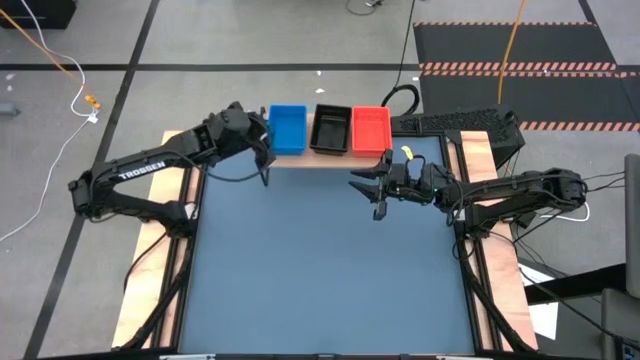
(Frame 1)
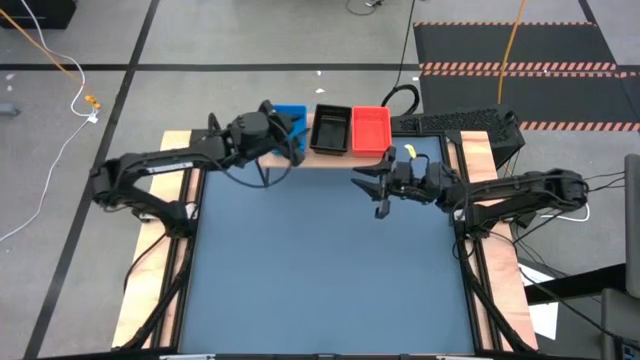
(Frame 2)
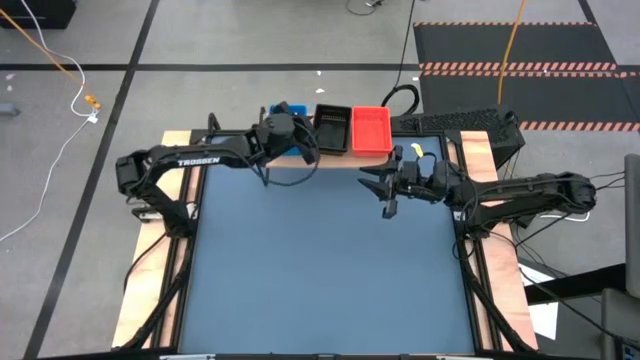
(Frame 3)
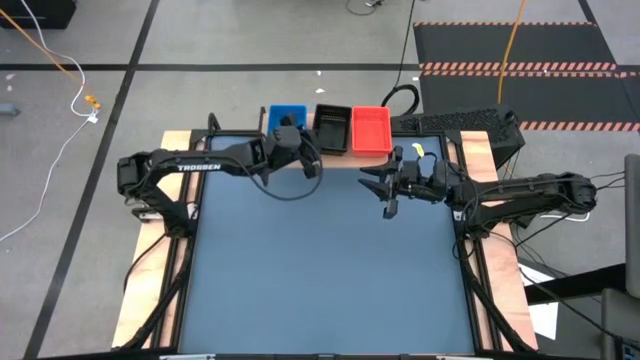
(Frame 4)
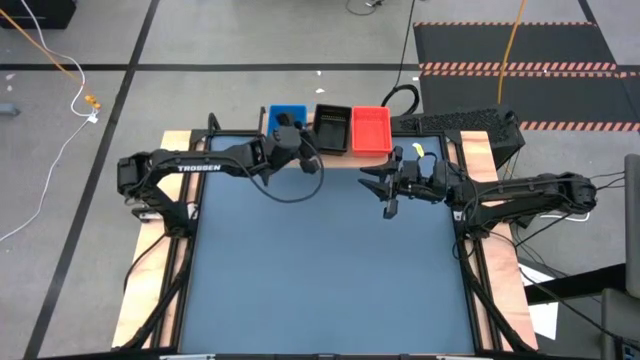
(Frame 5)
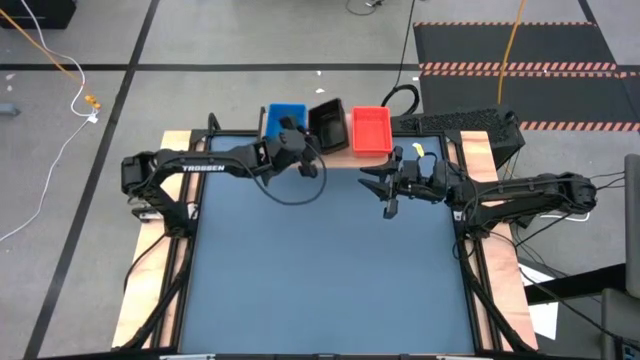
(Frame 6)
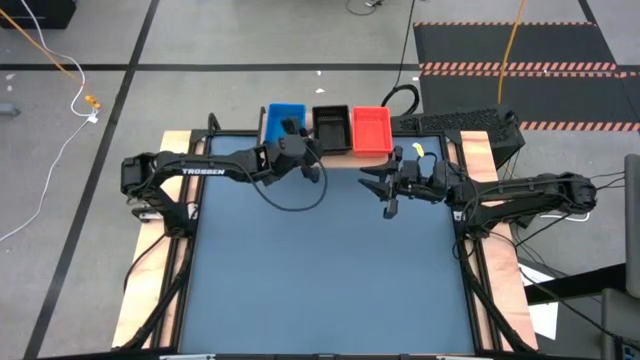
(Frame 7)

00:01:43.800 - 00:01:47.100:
Task: Stack baskets on shelf by color
Adjust the stacked black bins on the shelf

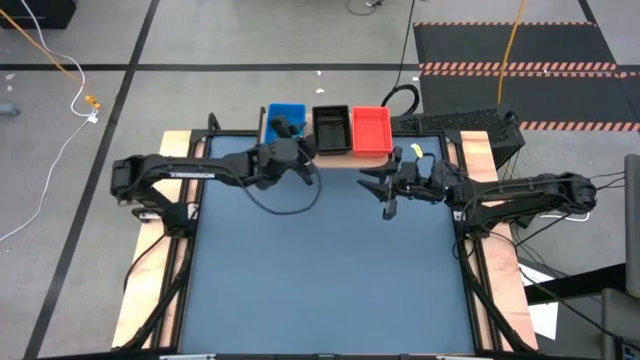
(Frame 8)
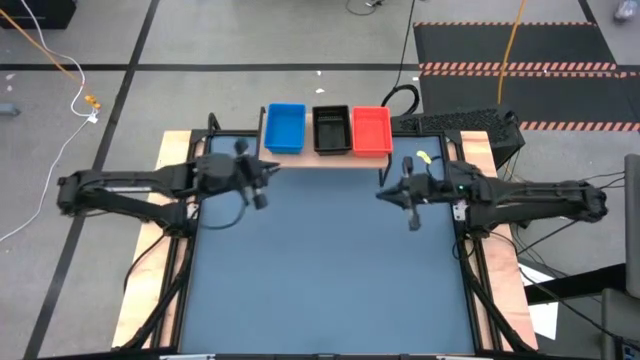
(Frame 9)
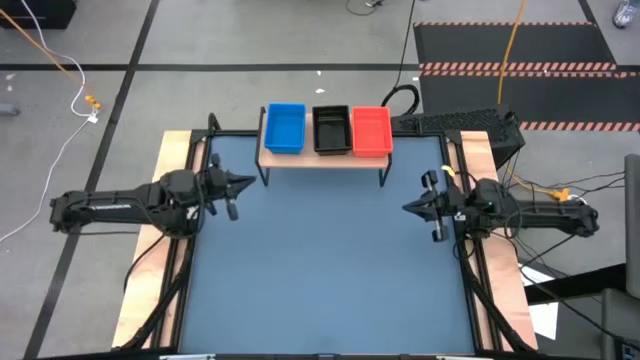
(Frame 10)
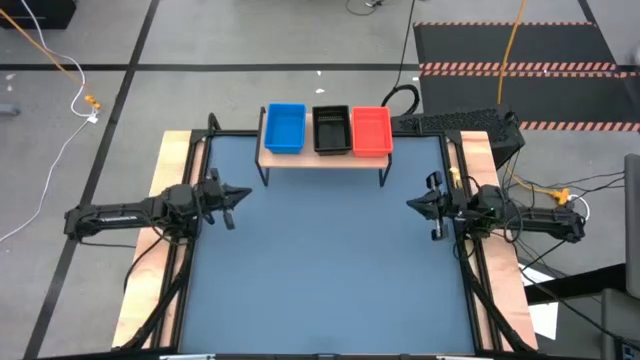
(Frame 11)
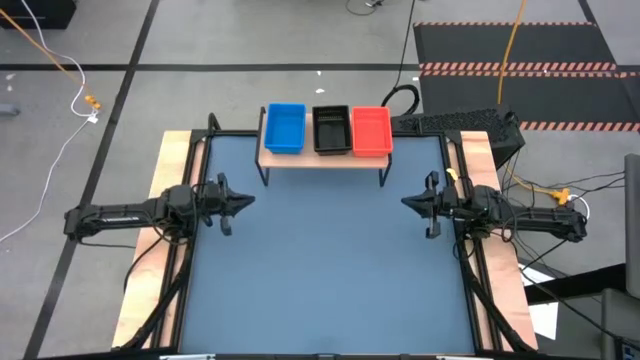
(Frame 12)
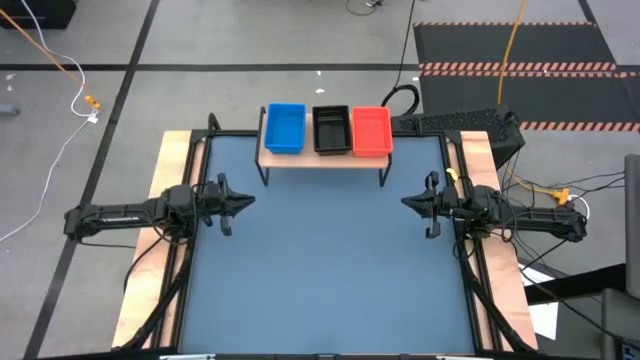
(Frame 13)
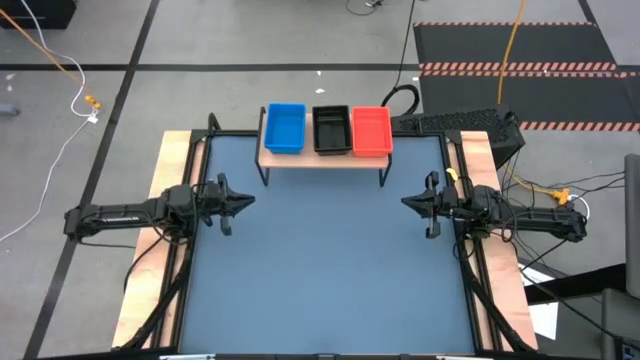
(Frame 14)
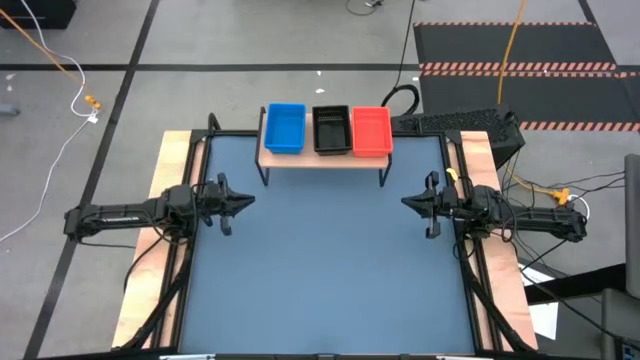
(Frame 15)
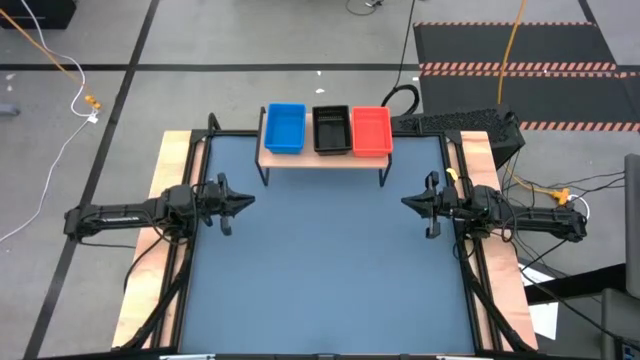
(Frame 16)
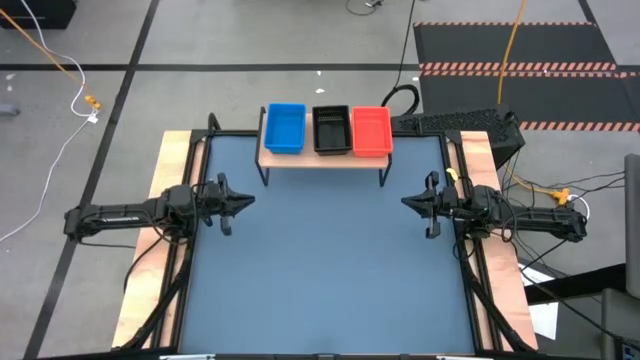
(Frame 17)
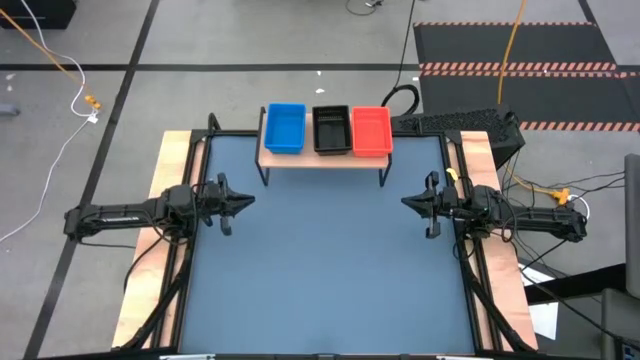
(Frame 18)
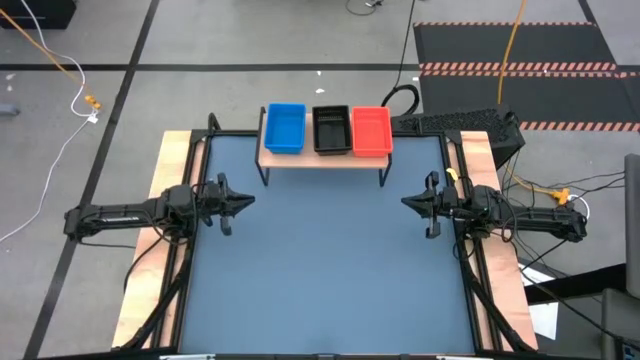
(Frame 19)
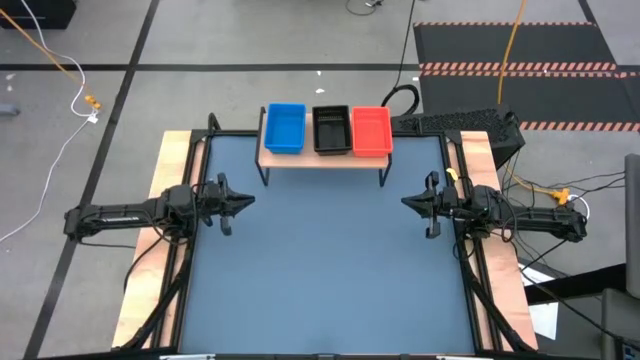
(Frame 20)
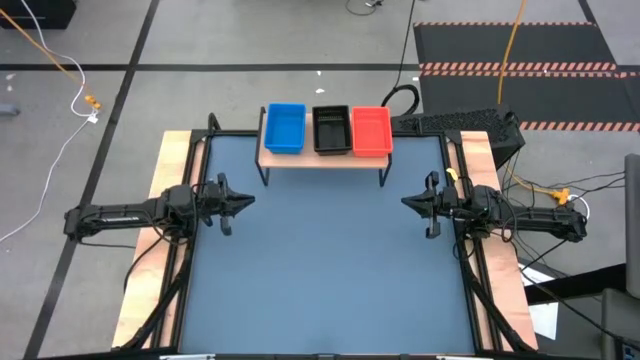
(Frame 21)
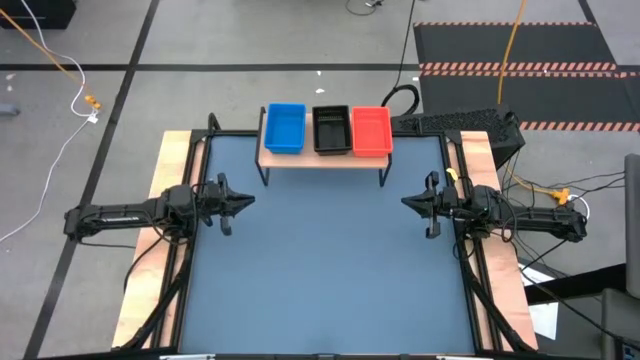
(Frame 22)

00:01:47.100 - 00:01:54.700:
Return to Home Position

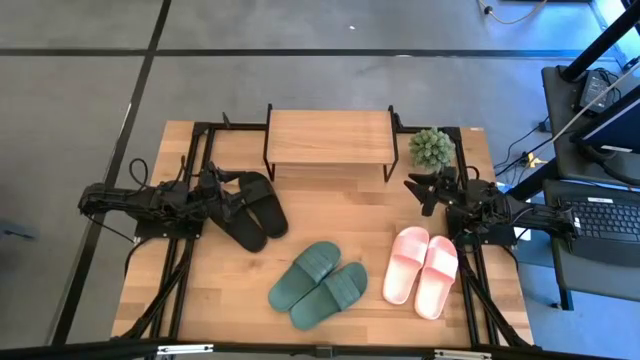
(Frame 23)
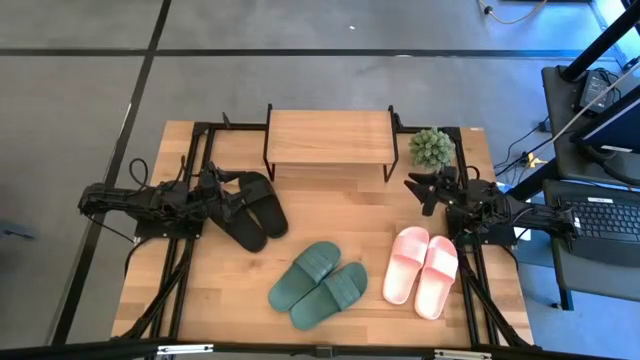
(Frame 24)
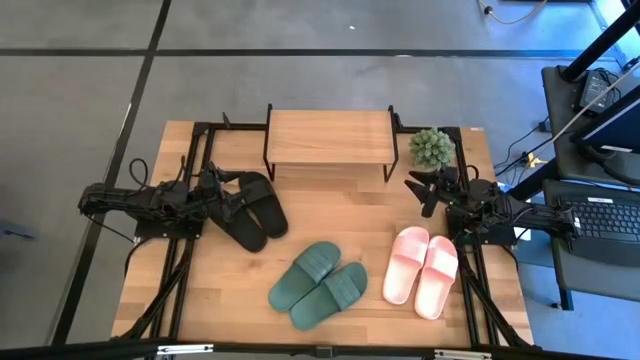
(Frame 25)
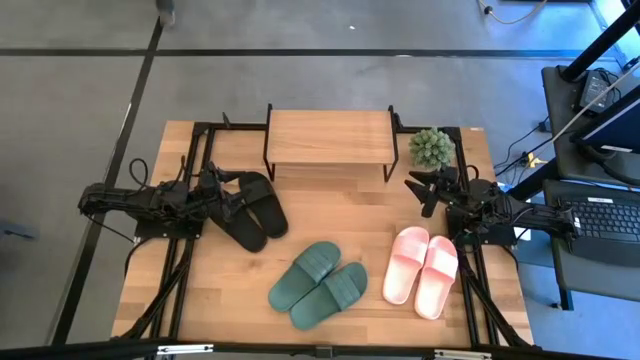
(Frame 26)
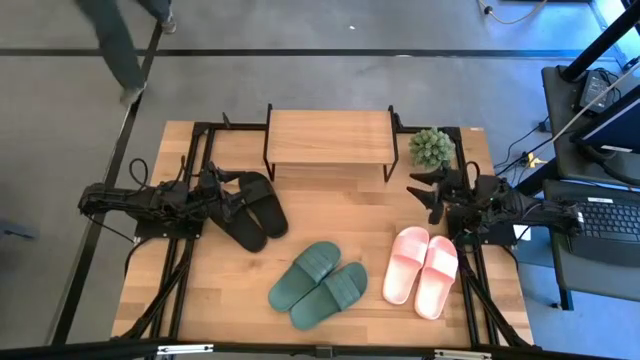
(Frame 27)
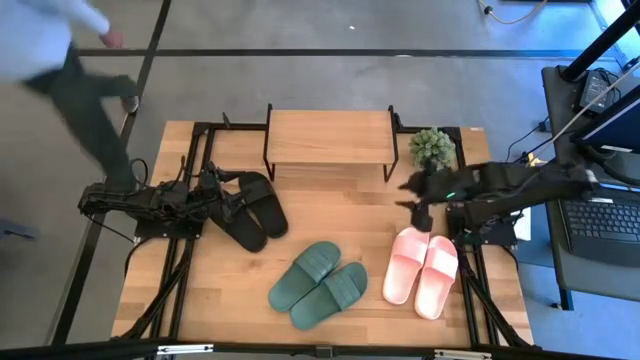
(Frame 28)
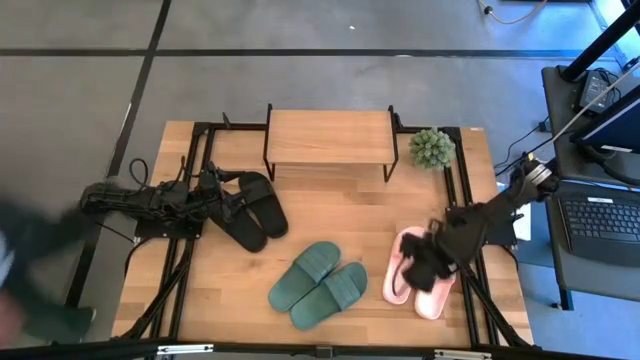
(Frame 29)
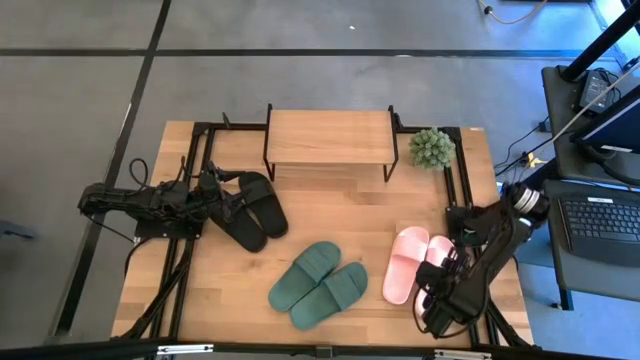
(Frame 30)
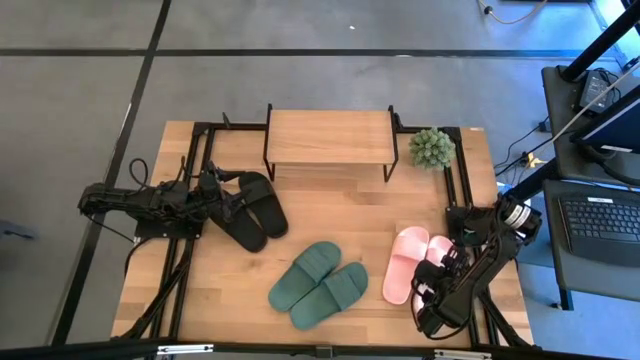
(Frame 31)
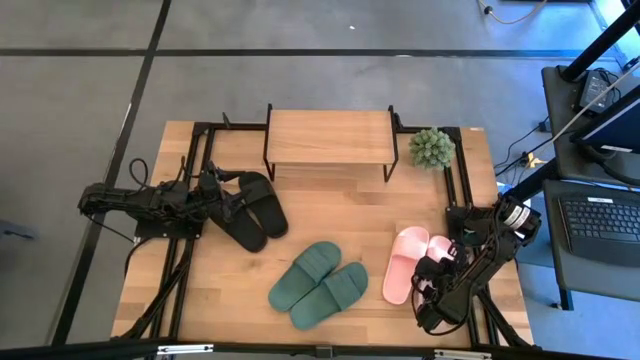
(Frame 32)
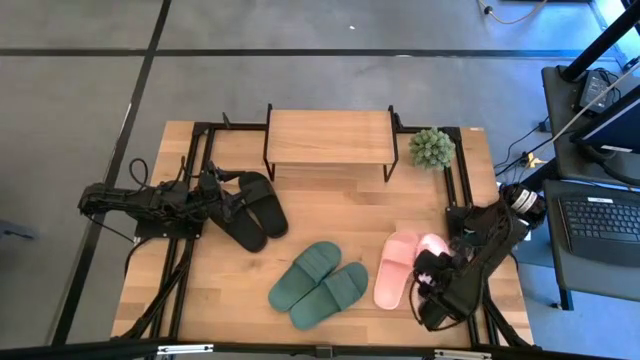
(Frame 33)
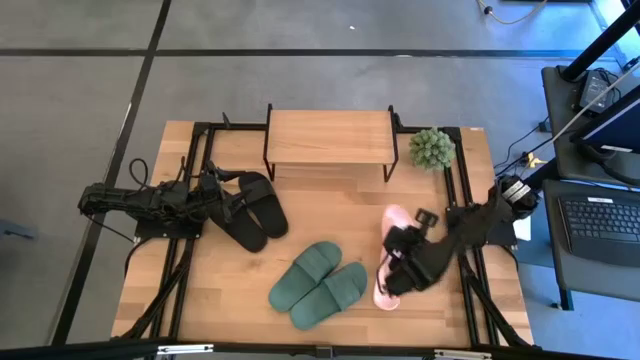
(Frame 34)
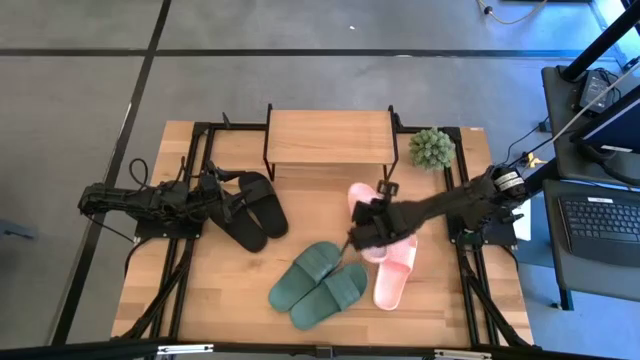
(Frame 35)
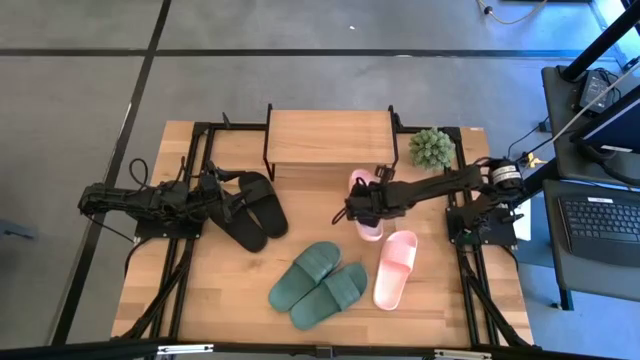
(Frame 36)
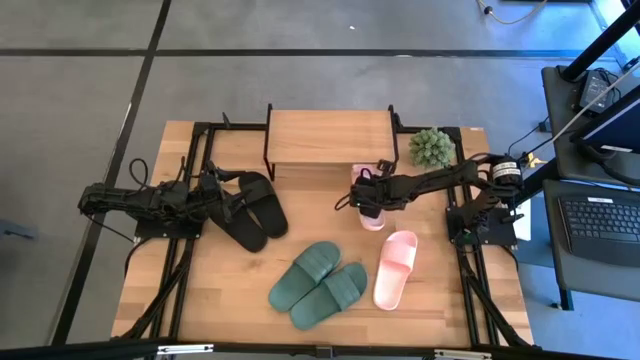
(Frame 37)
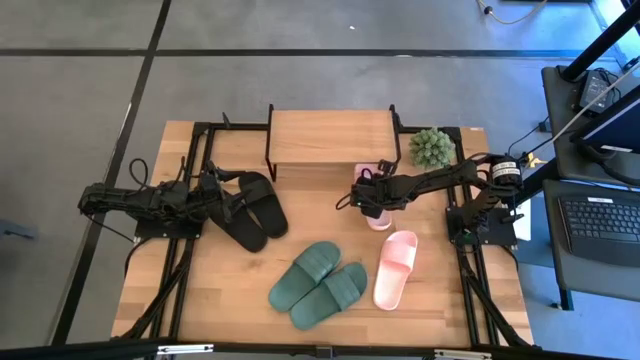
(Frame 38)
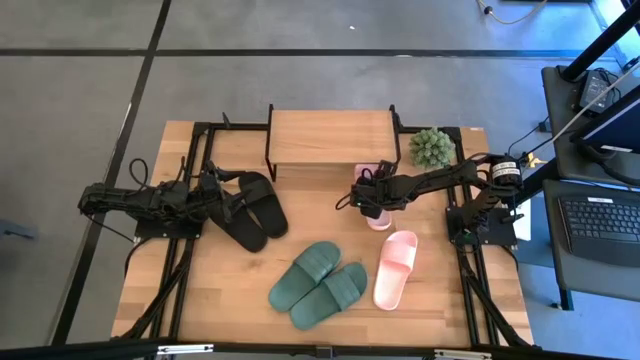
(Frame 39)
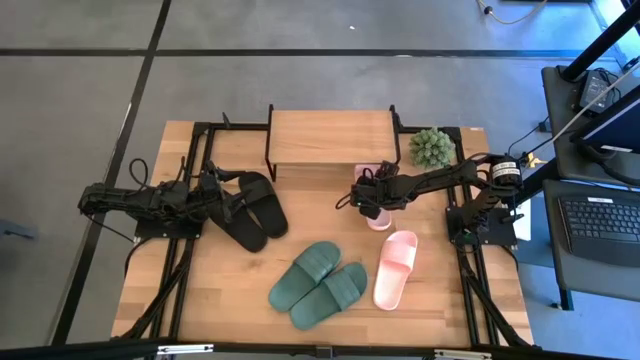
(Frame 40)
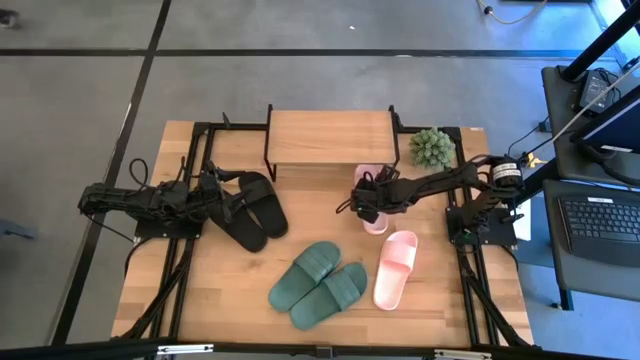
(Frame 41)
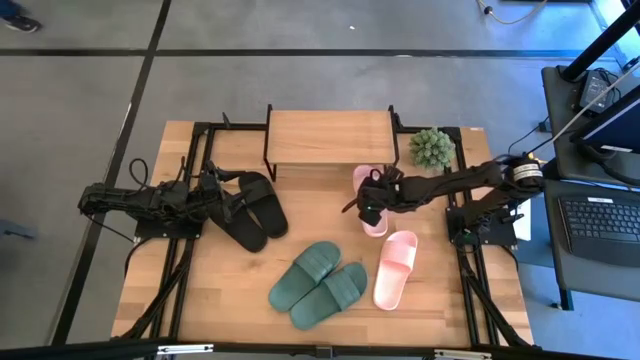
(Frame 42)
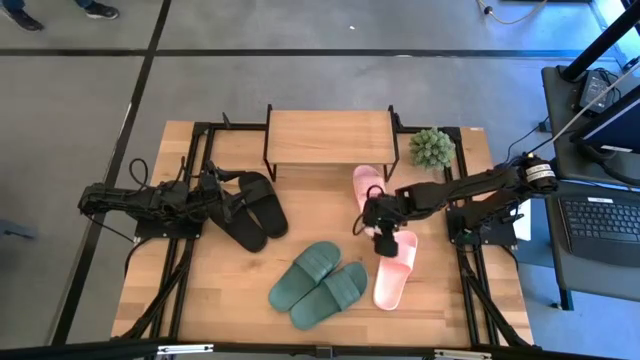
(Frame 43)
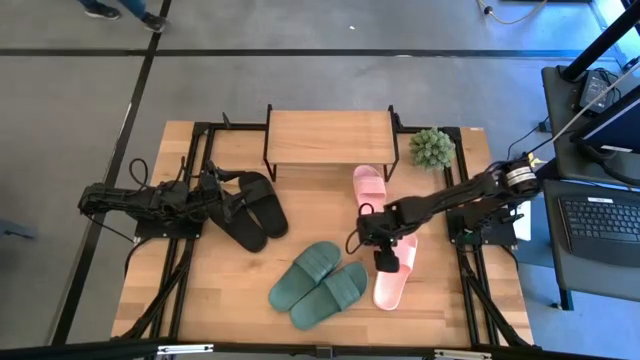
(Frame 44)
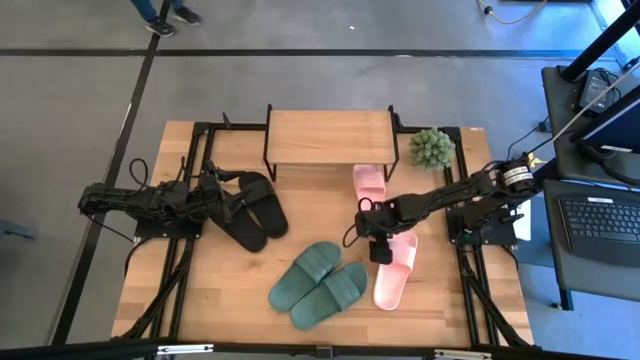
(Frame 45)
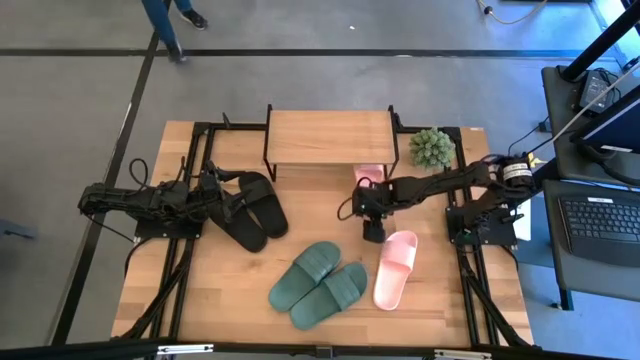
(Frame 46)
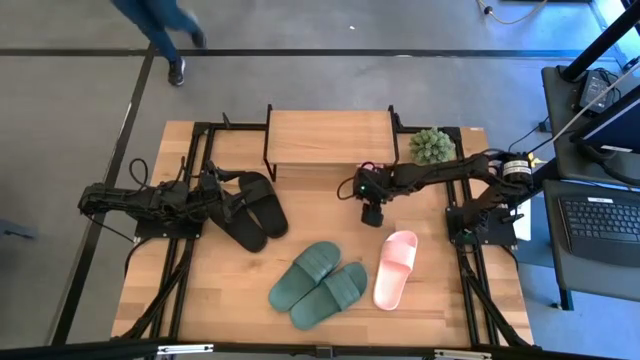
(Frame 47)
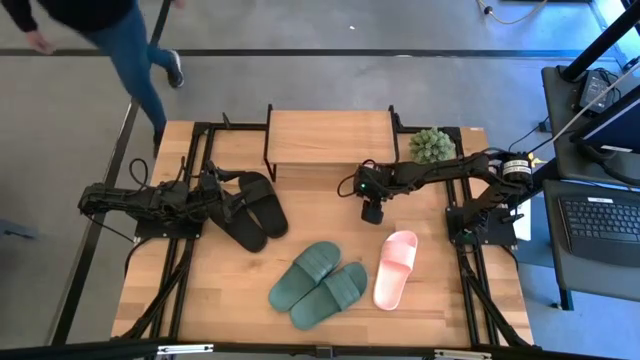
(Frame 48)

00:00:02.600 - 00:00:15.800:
Task: Pick and place slides into the shelf
Put the right pink slide under the shelf
